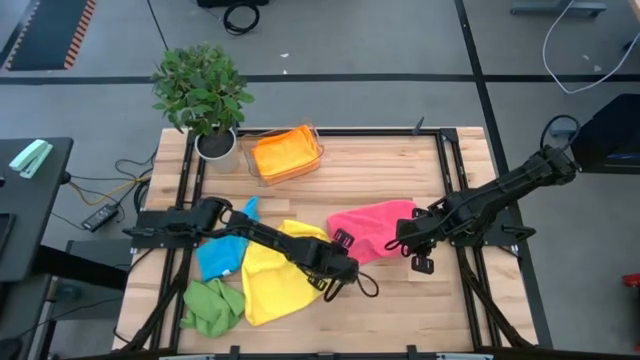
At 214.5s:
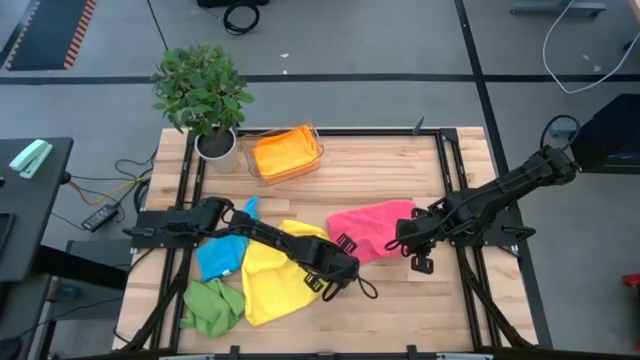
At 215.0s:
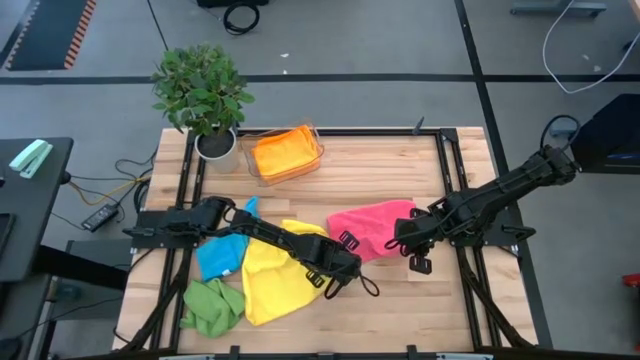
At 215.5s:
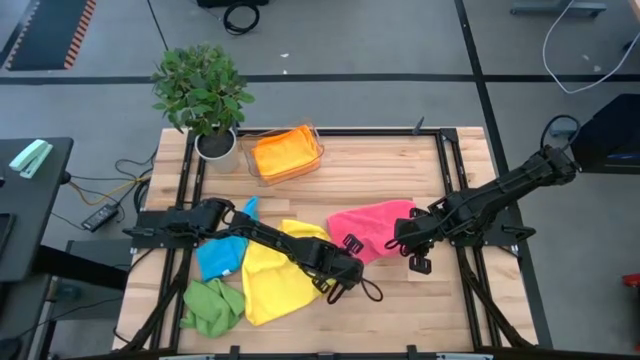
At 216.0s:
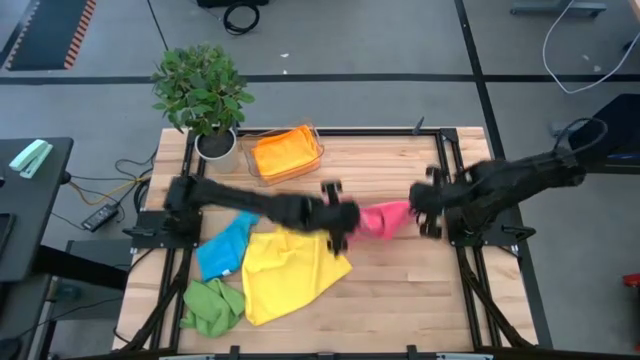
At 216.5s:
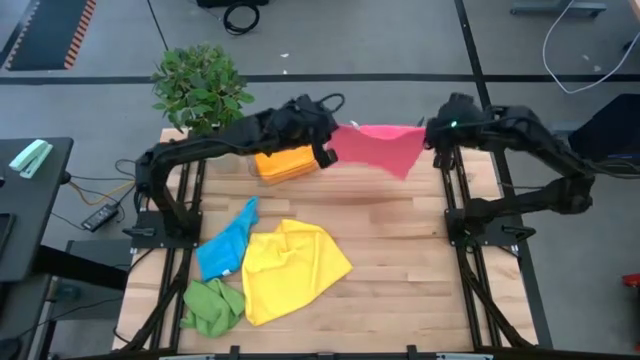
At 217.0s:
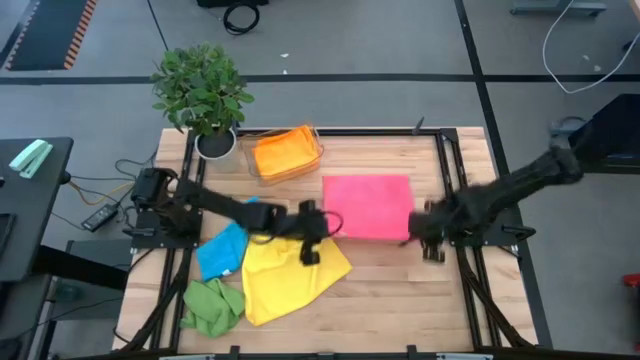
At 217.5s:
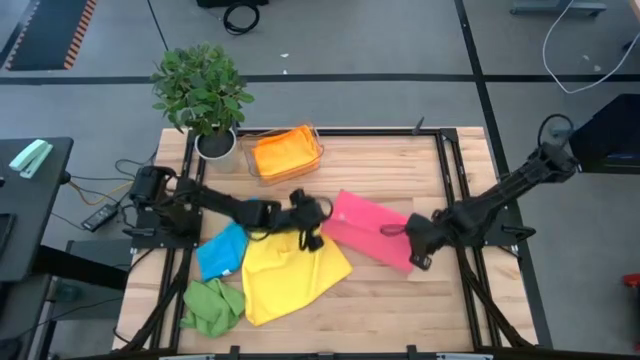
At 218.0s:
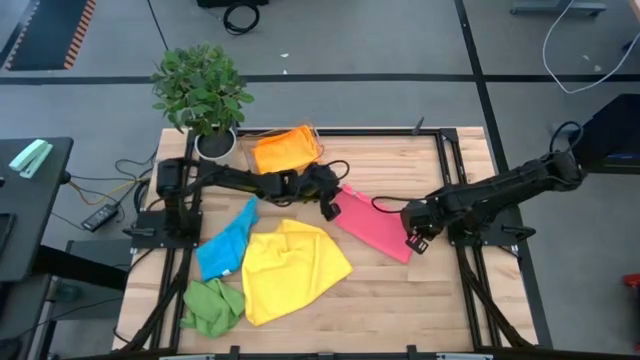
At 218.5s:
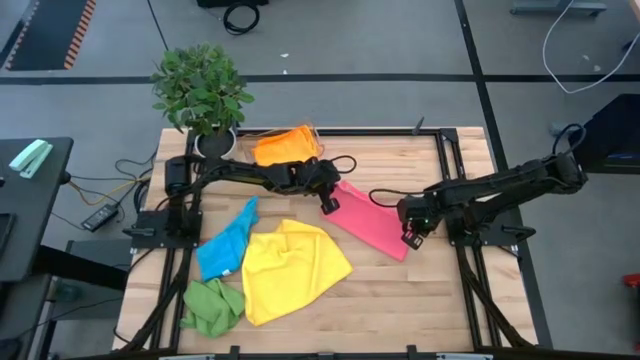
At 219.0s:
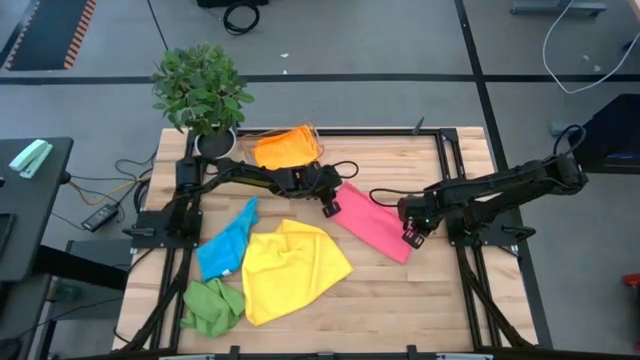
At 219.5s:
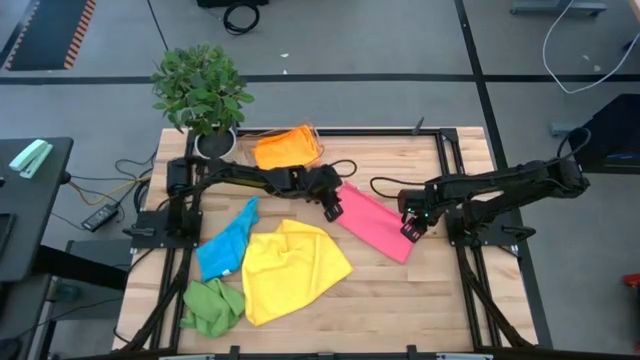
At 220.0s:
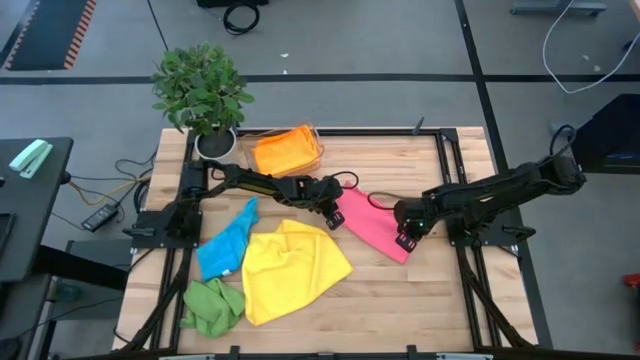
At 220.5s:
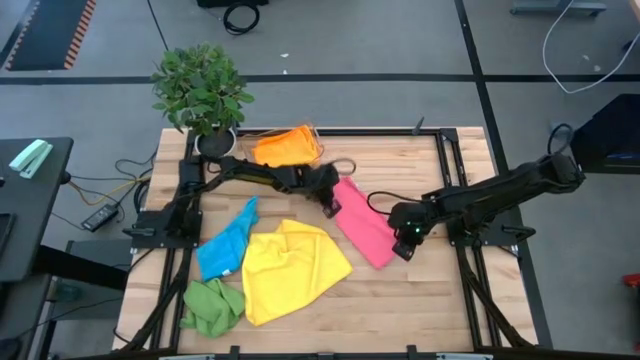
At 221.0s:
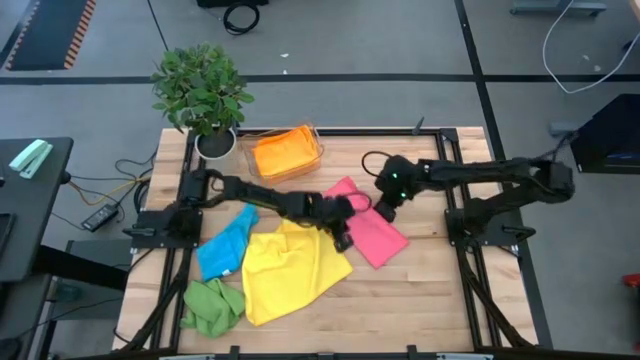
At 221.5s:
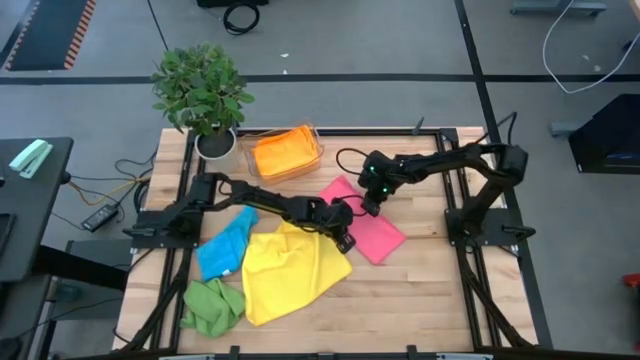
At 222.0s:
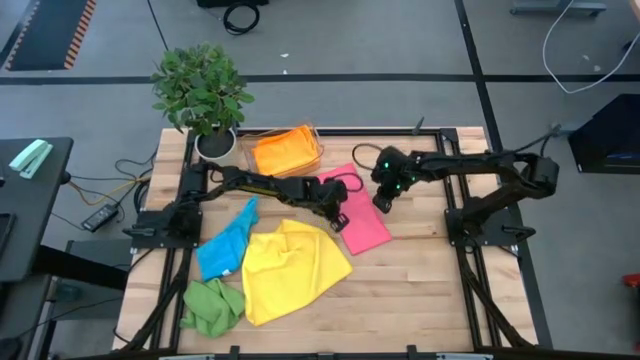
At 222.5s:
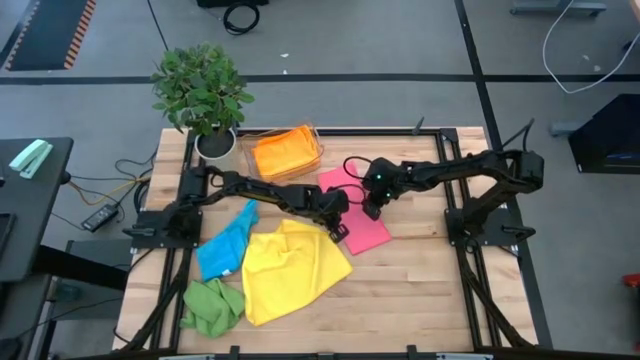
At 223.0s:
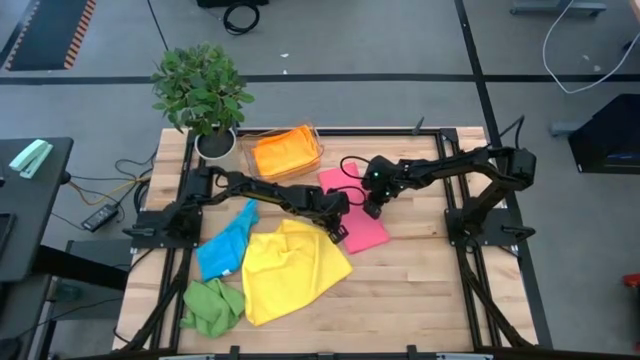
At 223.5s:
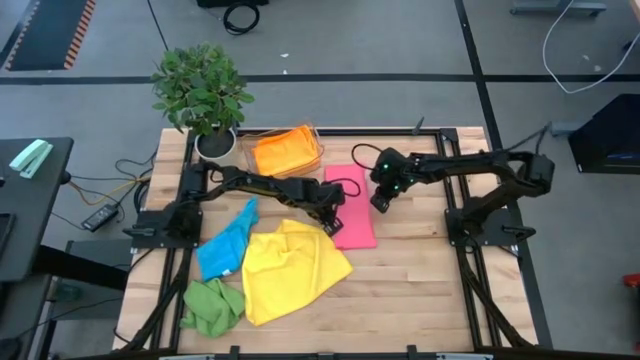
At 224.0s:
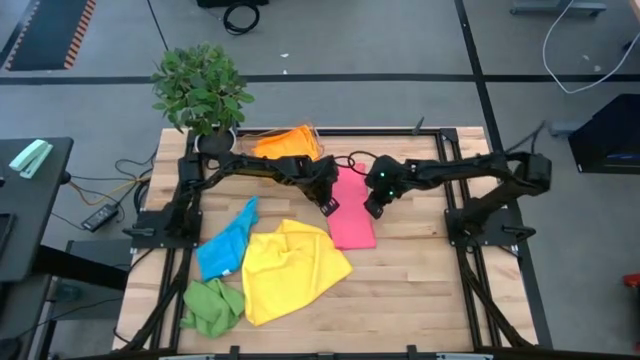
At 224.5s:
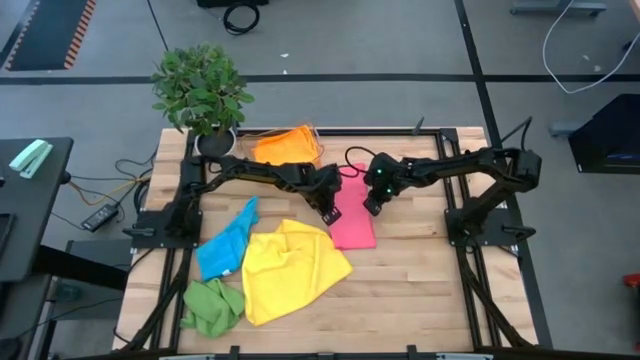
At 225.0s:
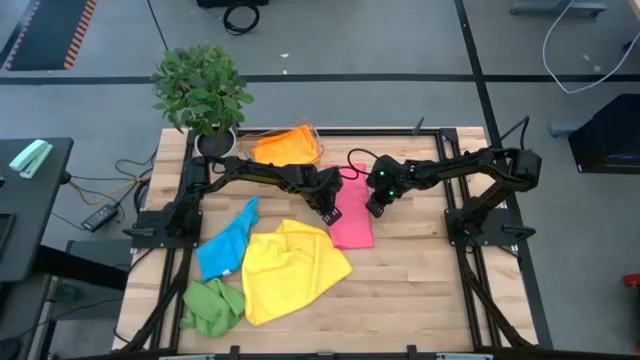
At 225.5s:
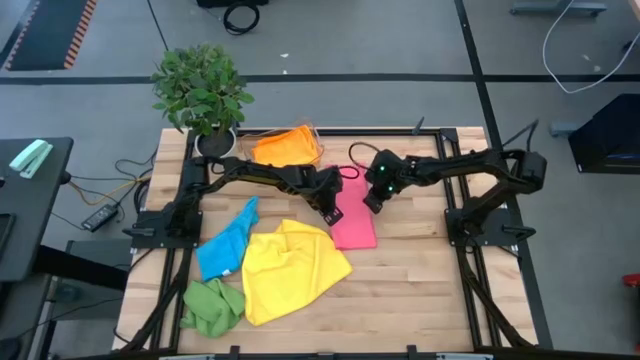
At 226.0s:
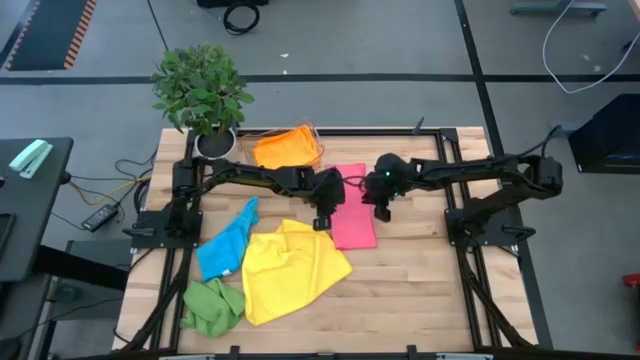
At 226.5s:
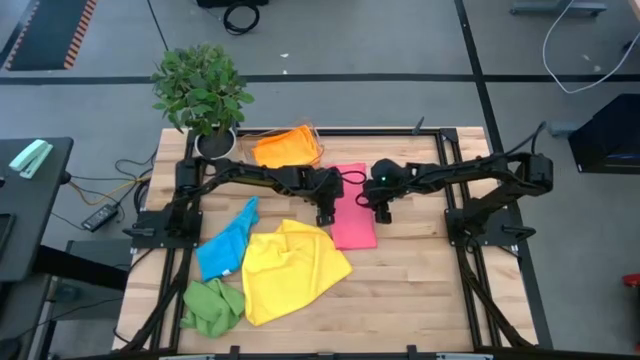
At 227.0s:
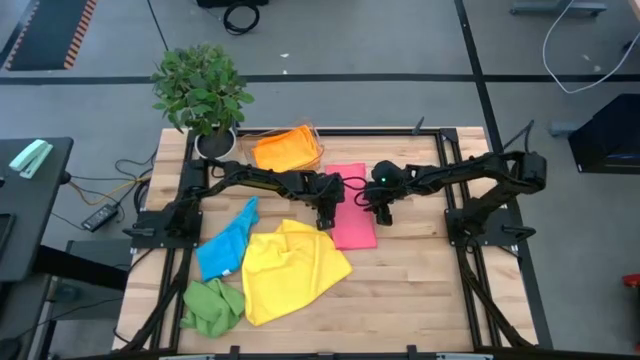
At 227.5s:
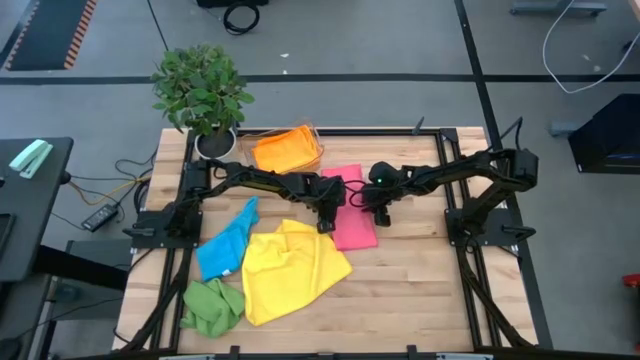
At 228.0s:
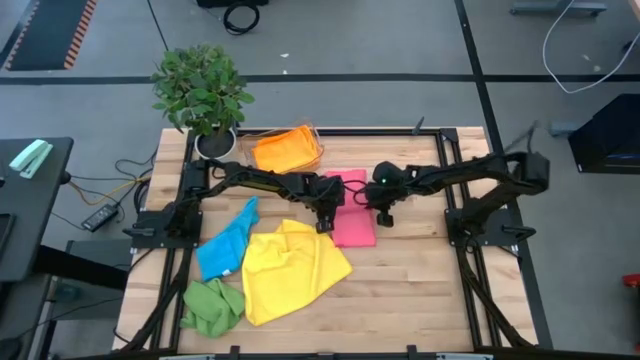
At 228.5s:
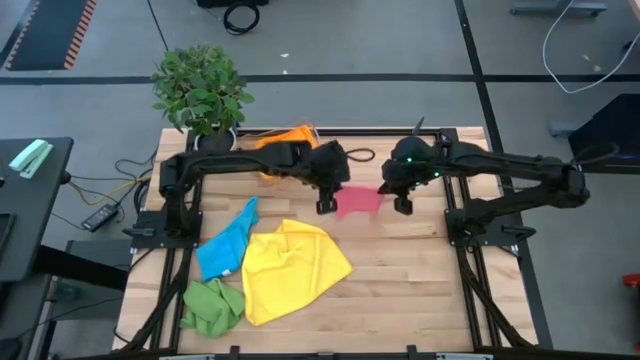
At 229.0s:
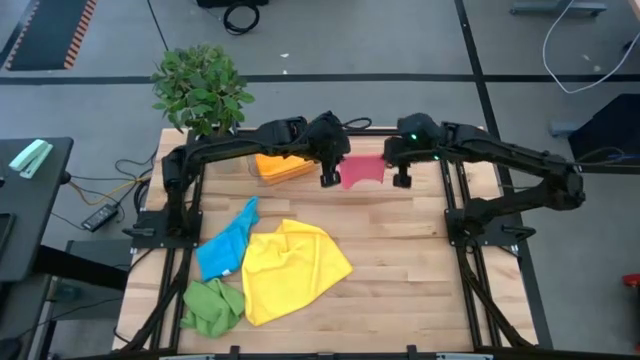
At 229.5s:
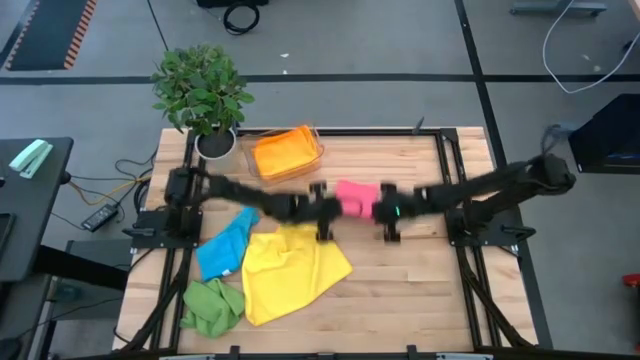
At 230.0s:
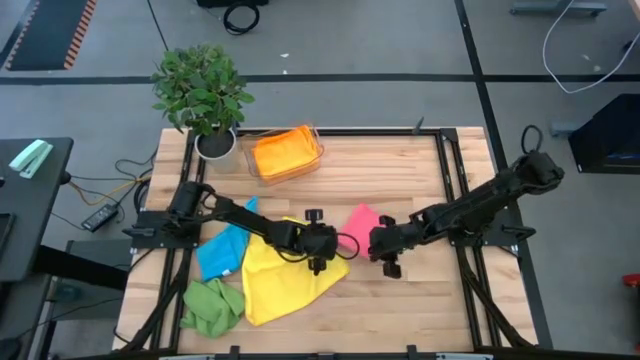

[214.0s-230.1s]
Task: Fold microfiber towels
Fold the pink microfiber cloth

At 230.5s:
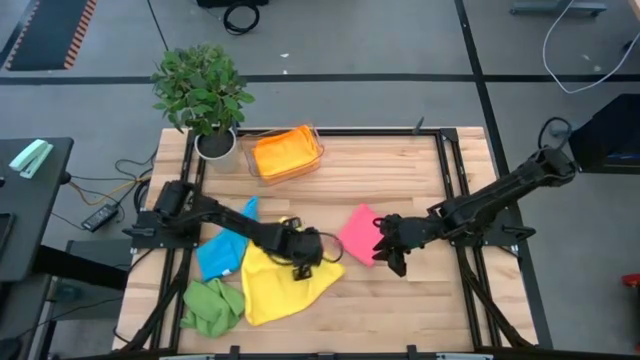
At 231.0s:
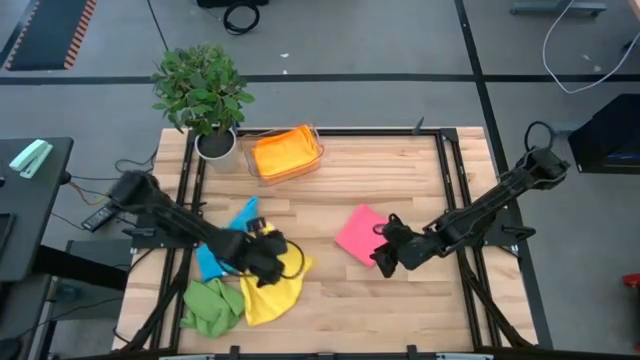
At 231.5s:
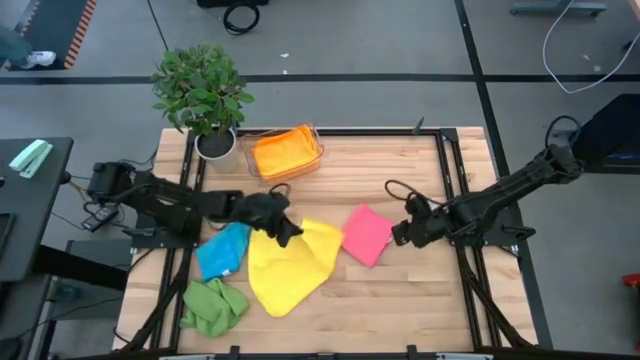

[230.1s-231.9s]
Adjust the yellow microfiber cloth

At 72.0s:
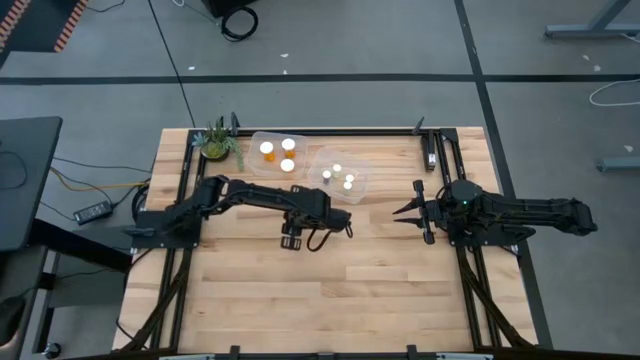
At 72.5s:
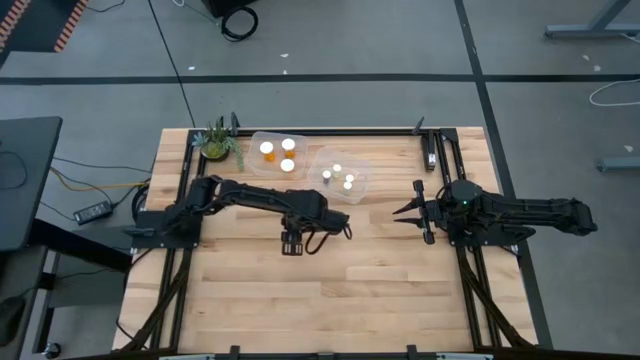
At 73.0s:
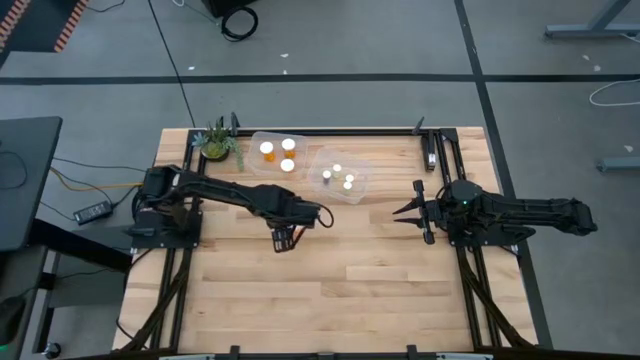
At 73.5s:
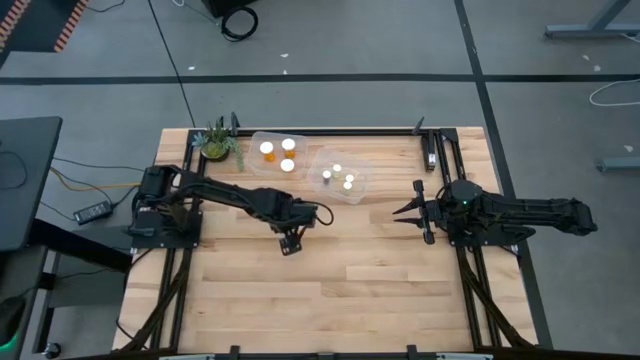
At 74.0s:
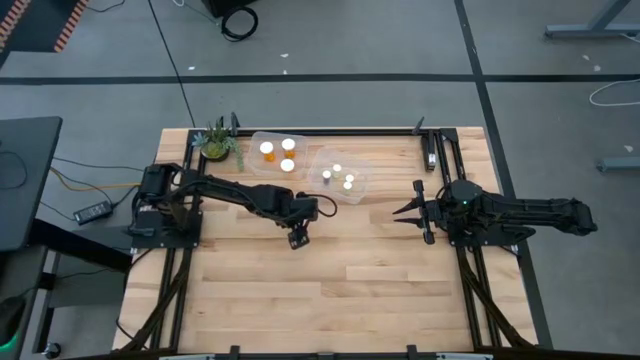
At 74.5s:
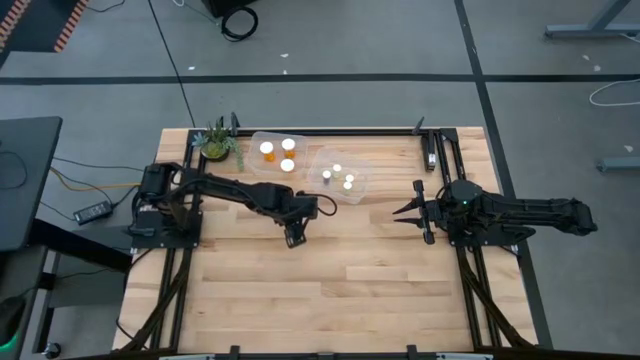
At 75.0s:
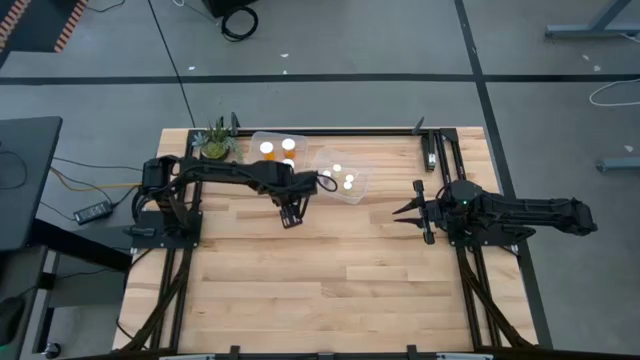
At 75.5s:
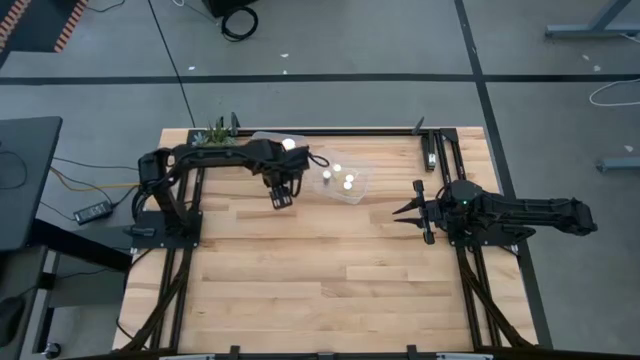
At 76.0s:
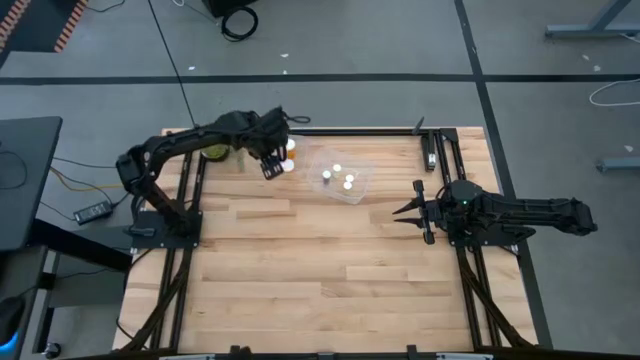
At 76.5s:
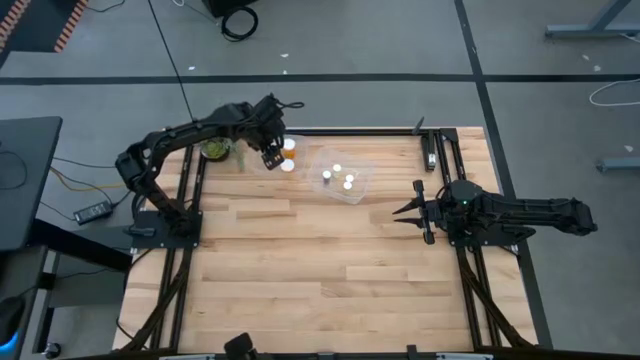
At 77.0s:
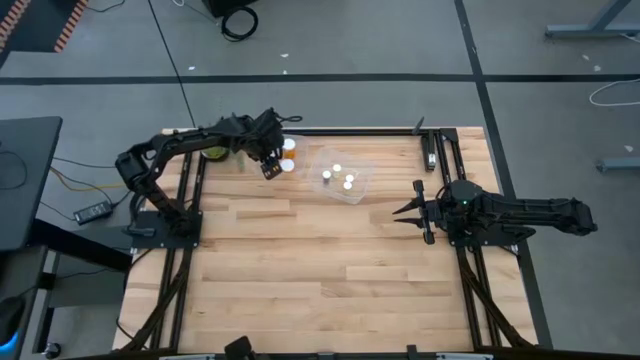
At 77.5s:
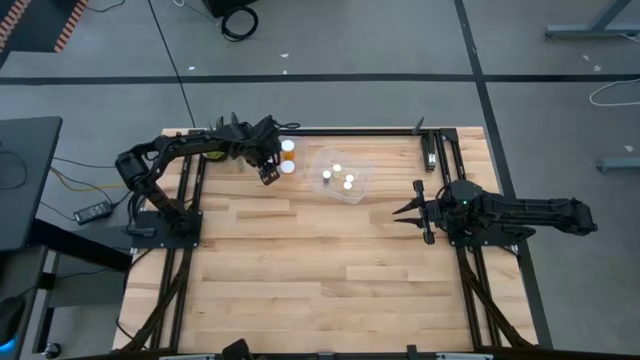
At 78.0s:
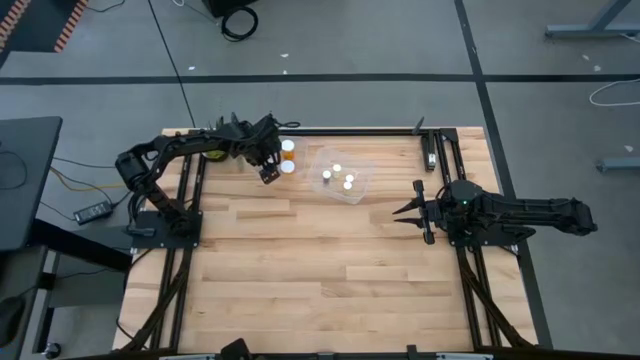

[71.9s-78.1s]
Task: Pick and place medicine bottles into bin by pill shape (circle, oval)
Put the big orange pill bottle into the left transparent bin
